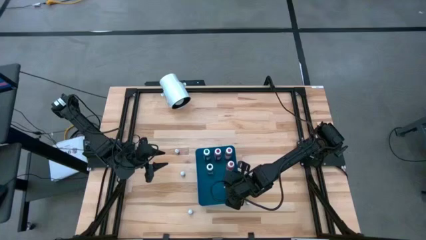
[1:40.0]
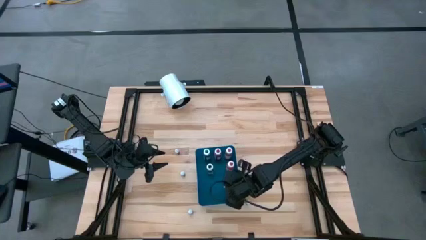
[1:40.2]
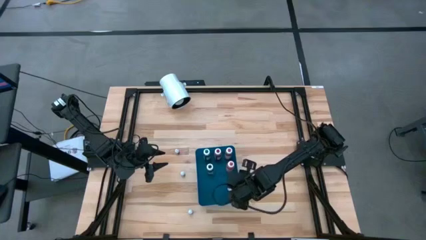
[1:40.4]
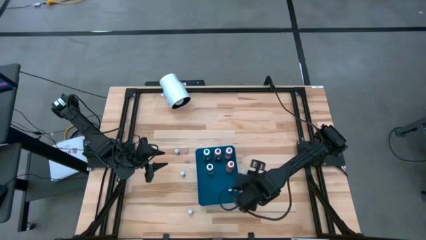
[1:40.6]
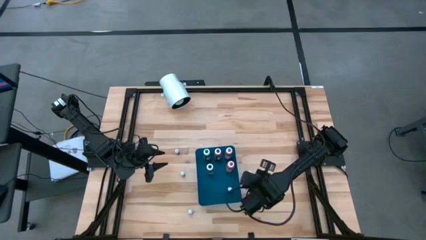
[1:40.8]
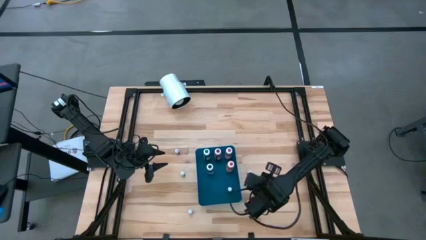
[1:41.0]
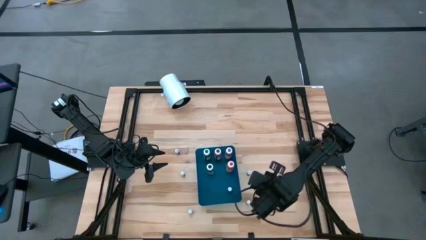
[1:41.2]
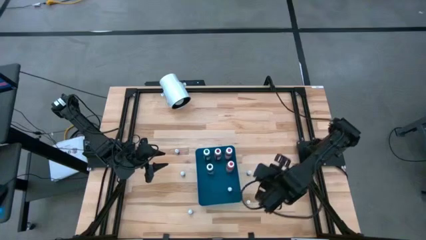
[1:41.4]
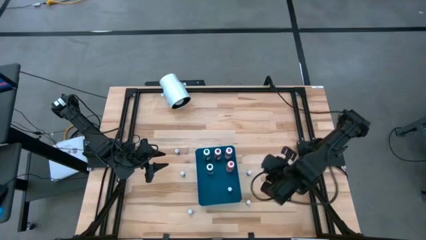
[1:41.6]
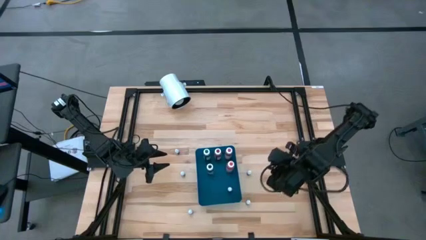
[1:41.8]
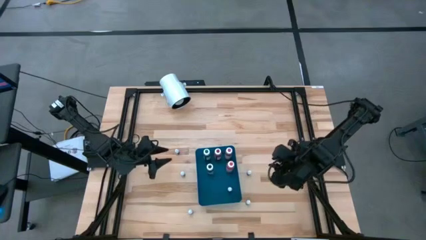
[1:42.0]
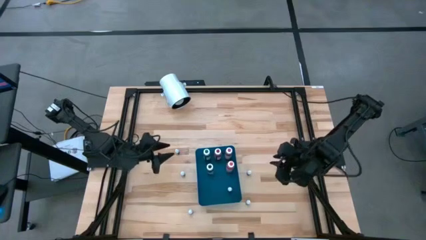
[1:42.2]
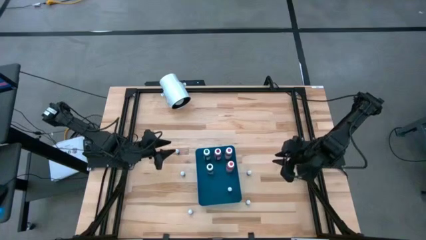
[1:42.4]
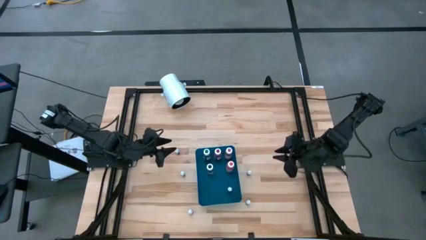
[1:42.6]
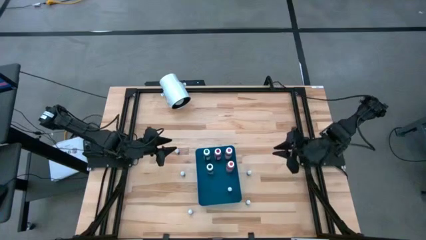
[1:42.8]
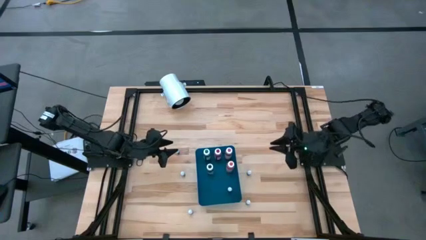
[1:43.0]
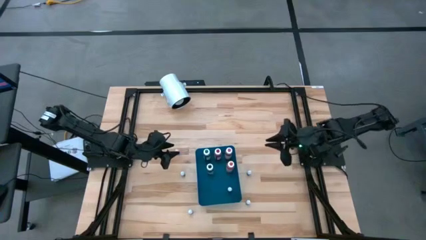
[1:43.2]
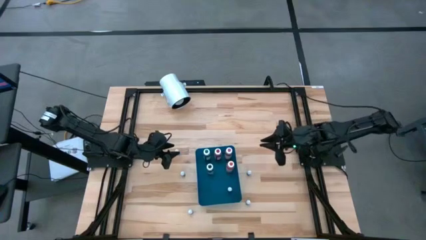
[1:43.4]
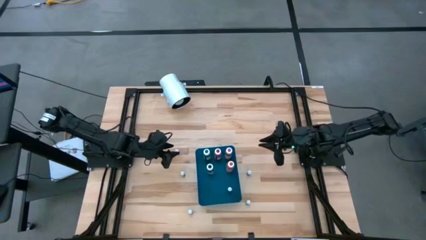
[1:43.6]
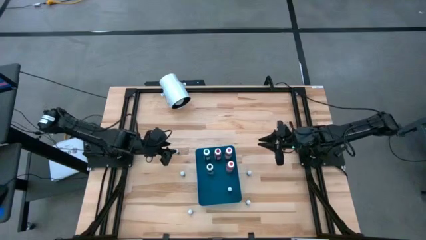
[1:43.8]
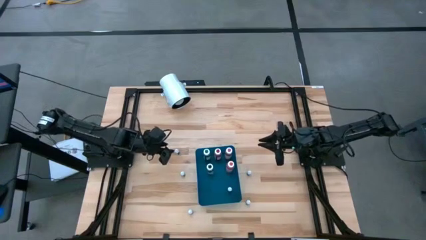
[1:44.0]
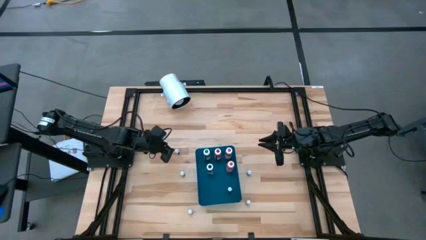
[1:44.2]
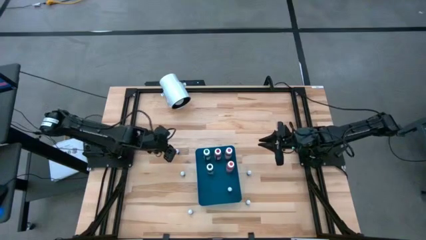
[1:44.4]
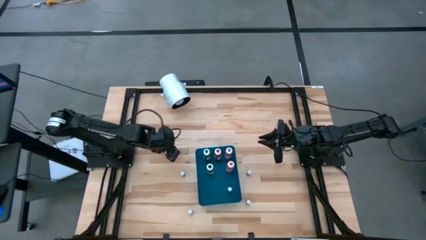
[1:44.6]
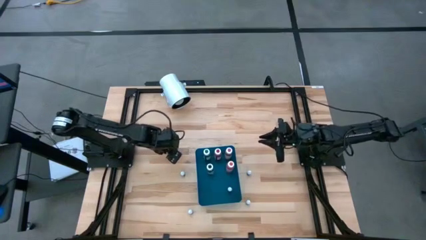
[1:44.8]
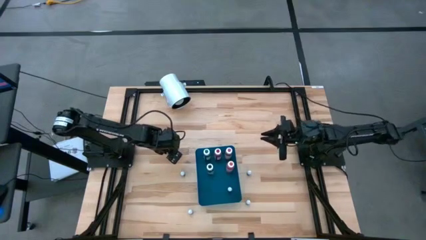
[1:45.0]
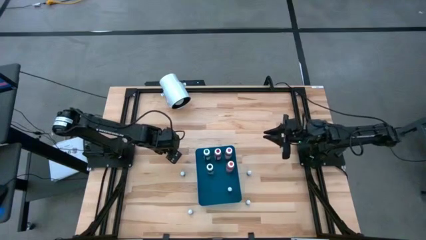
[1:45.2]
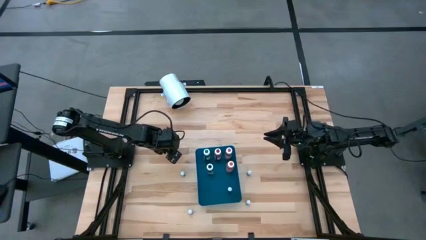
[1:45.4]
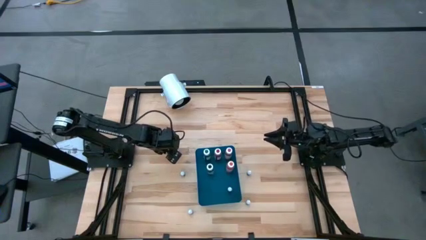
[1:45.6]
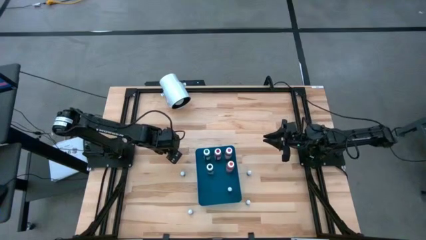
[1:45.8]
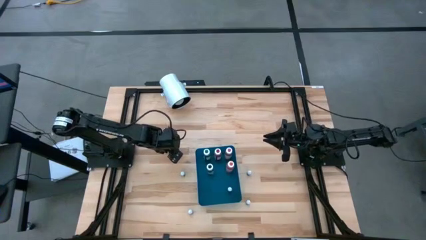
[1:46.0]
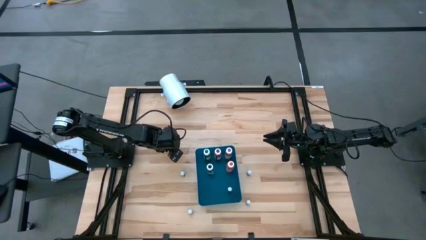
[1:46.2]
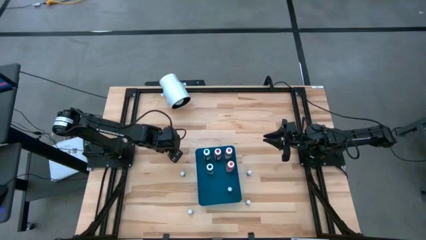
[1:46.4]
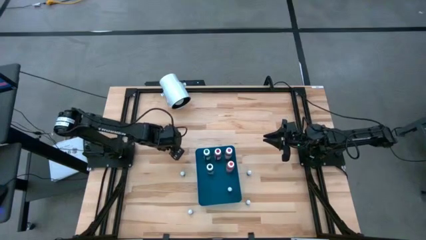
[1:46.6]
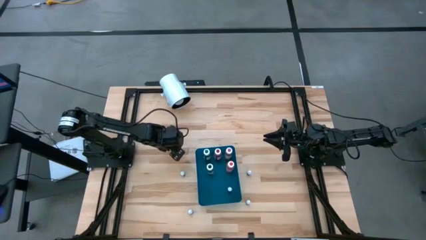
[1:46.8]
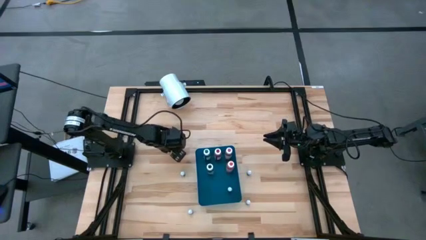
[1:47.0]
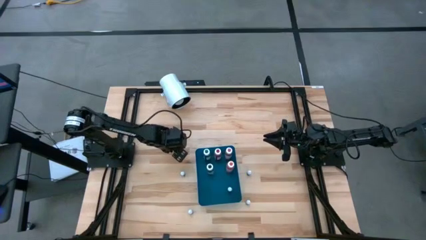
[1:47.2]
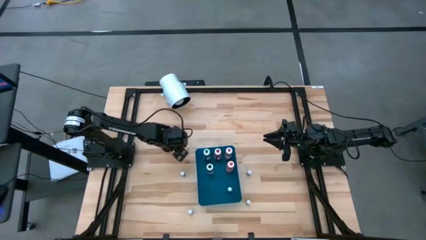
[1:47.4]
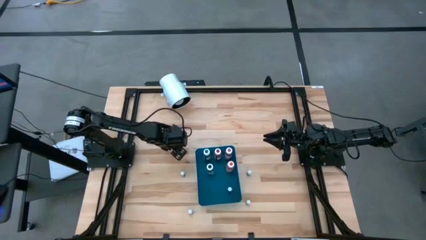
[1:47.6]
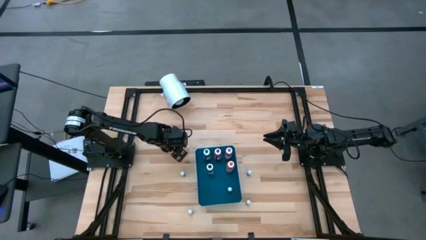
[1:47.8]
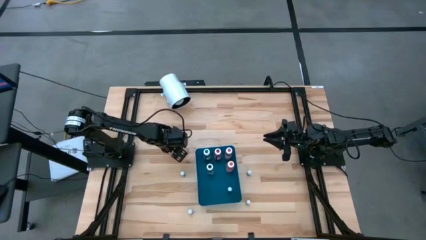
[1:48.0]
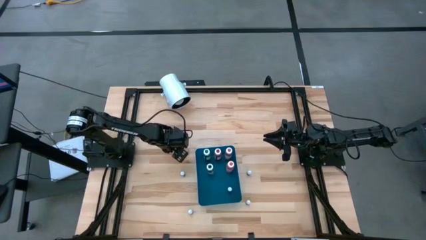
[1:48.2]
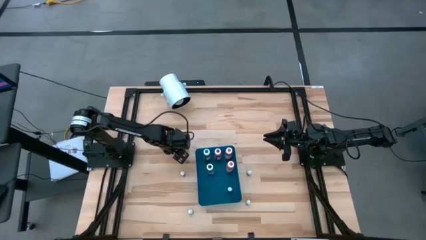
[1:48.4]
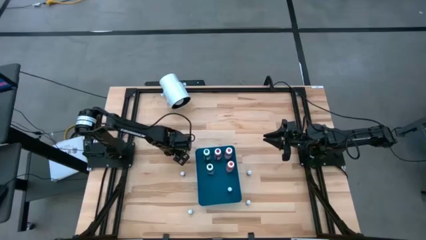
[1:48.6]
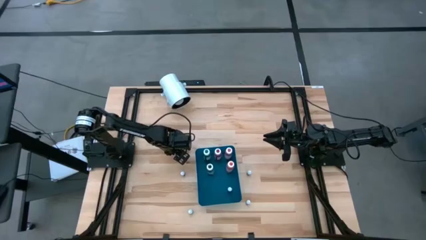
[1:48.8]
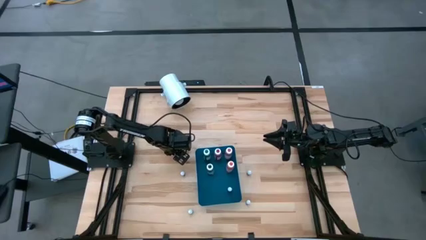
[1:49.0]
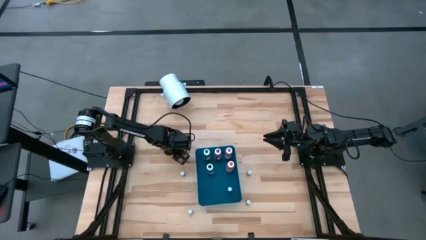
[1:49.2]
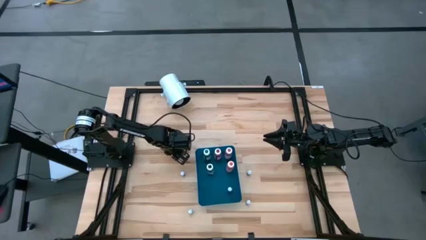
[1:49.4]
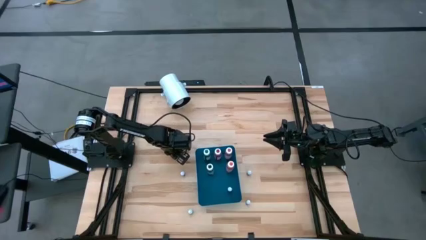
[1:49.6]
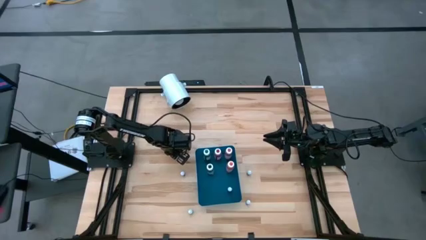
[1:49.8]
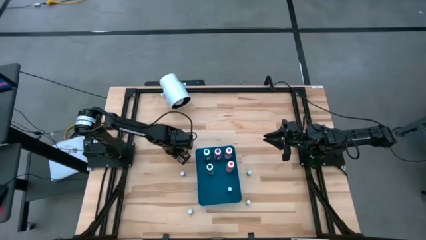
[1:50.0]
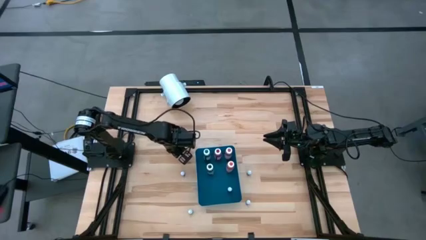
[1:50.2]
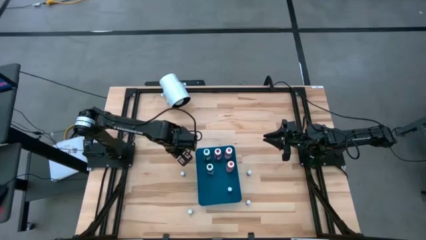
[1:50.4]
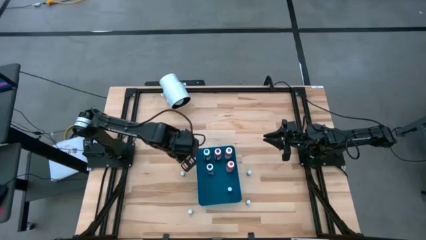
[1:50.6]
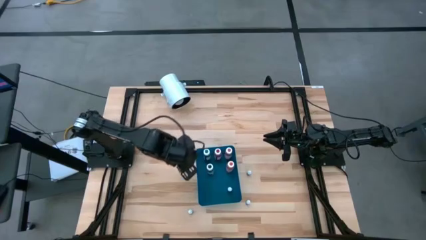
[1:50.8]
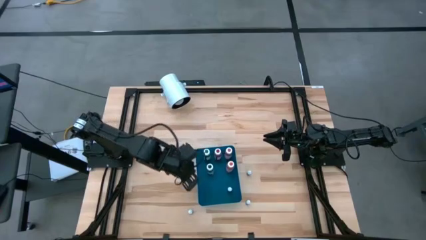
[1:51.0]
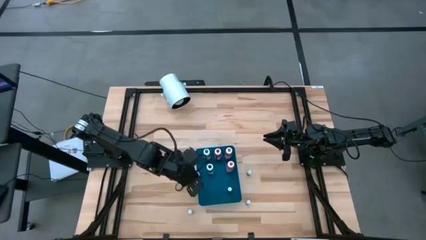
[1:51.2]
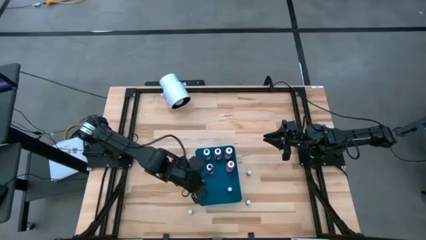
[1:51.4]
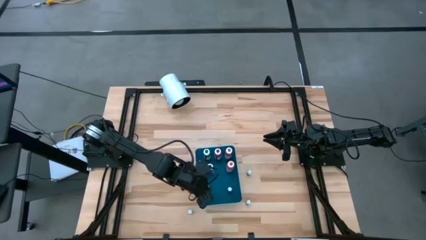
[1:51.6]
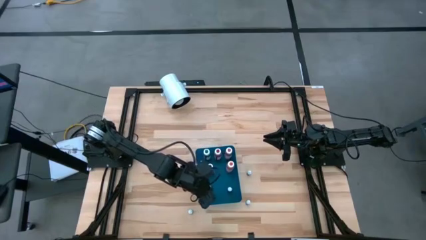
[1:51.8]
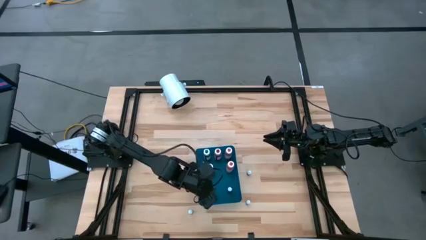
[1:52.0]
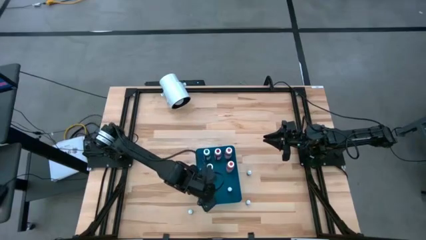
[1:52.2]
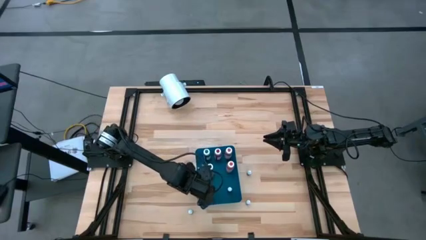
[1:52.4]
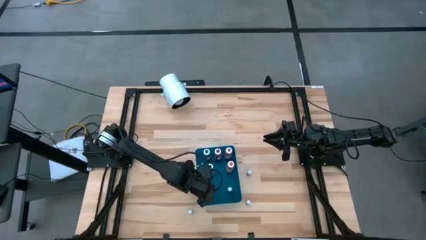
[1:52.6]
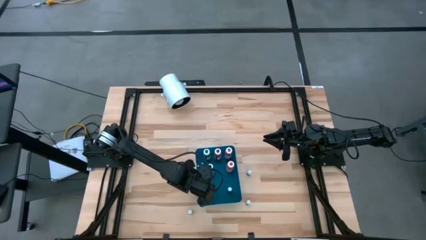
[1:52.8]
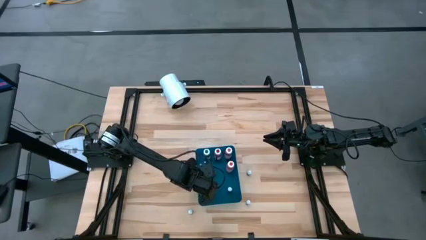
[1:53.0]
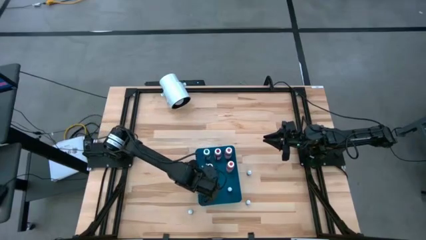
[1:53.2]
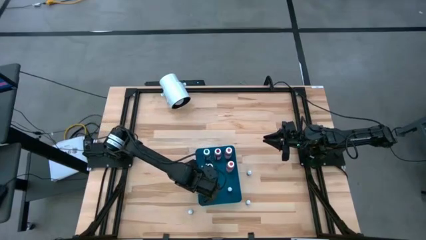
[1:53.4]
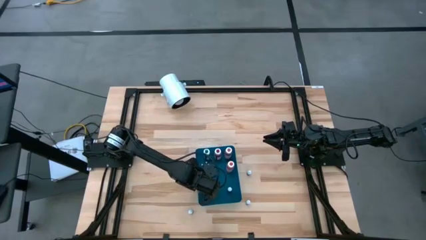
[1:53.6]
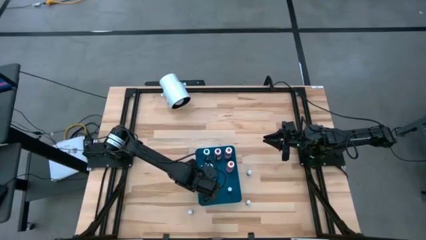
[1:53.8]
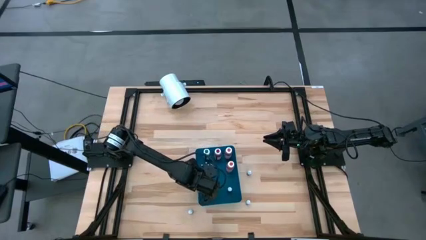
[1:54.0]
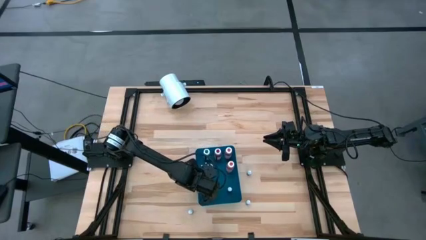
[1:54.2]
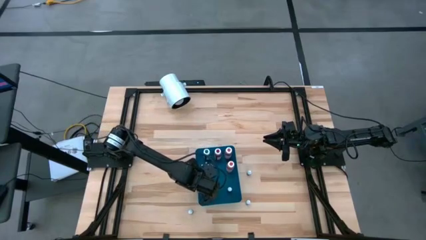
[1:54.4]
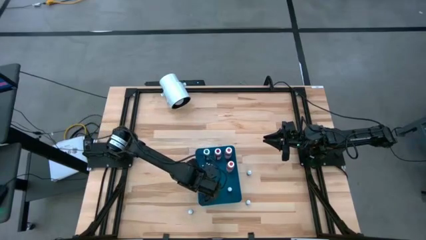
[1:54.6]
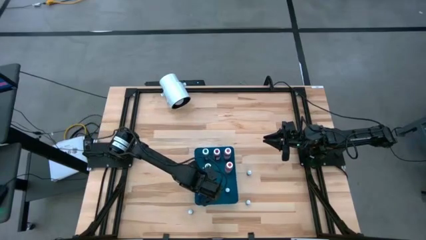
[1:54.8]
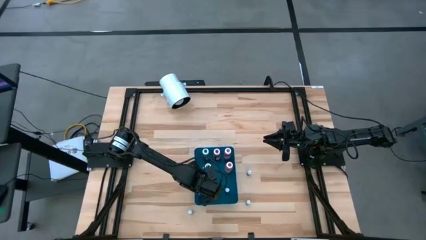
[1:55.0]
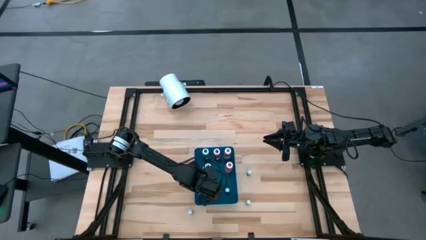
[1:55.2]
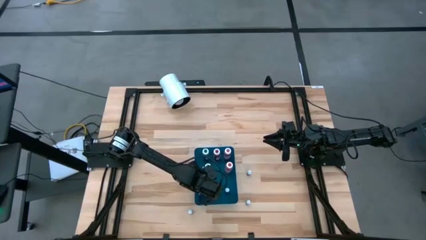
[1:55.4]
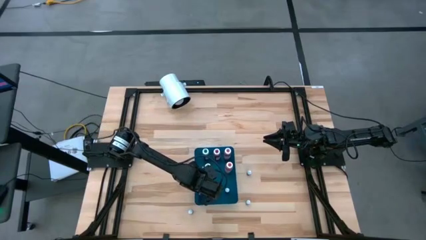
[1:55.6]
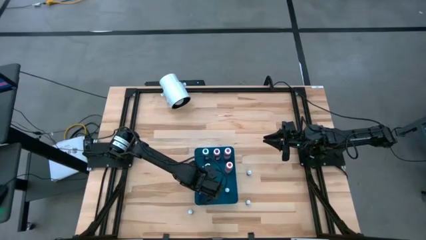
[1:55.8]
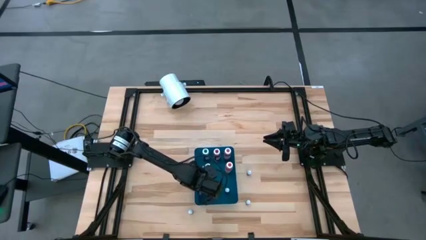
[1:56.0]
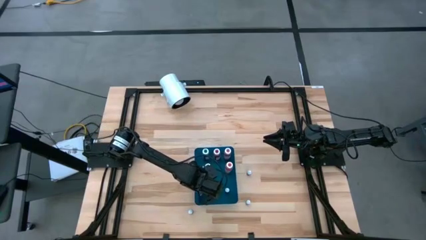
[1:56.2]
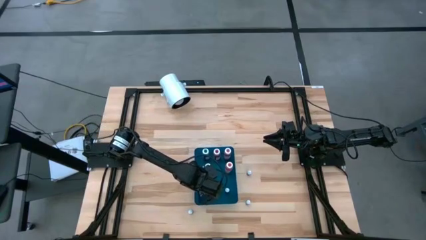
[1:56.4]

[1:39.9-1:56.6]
Task: Pick & Place food coloring
Put the small purple food coloring bottle into the blue container
